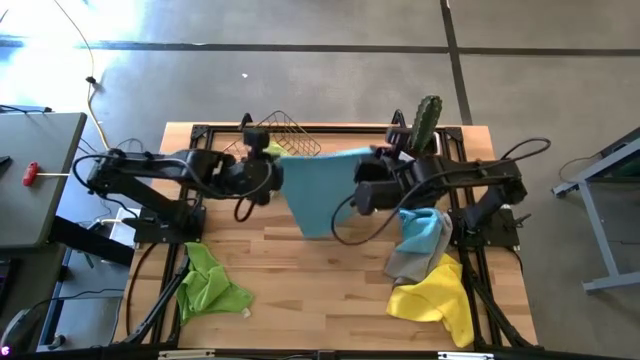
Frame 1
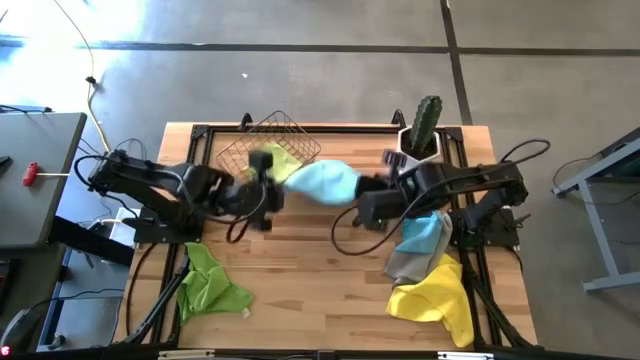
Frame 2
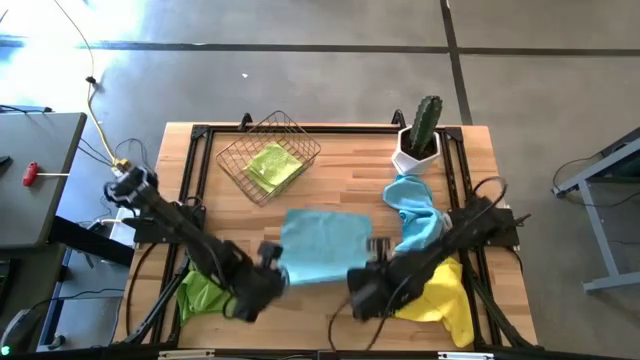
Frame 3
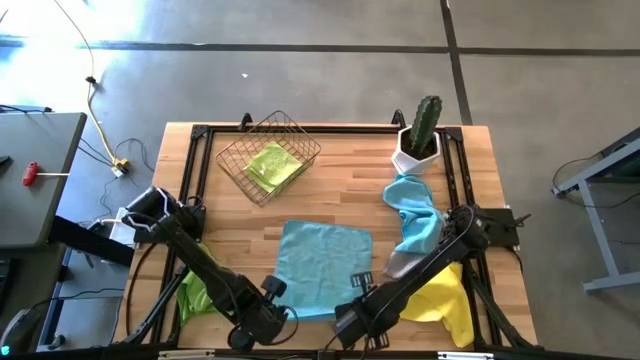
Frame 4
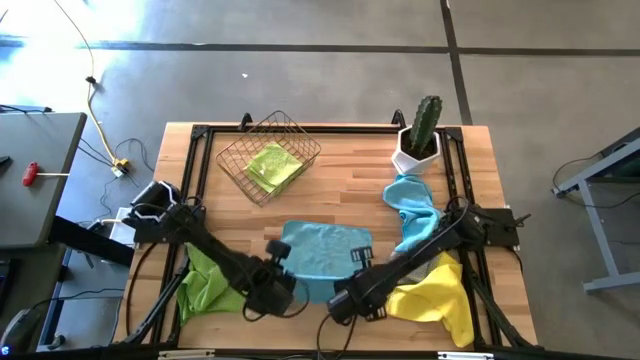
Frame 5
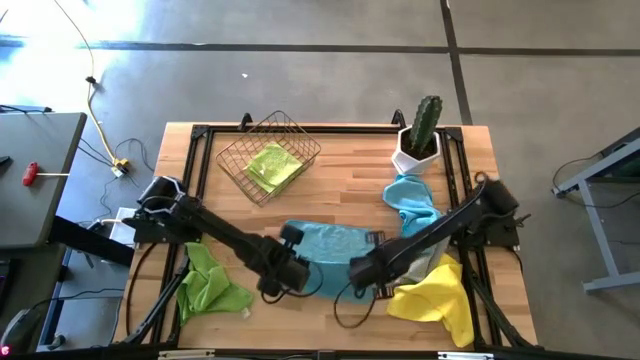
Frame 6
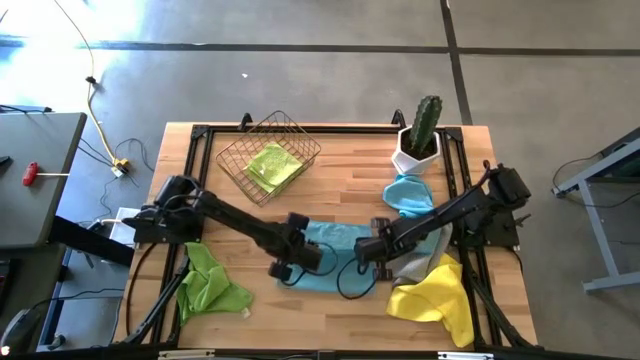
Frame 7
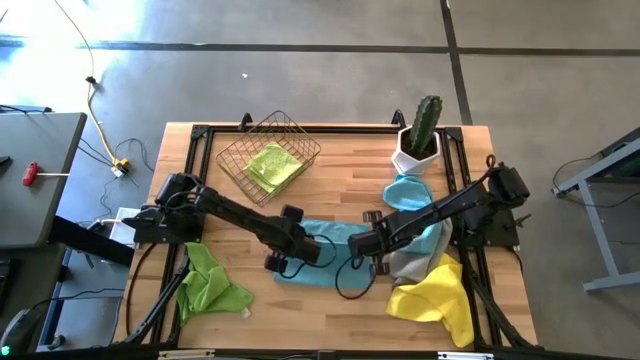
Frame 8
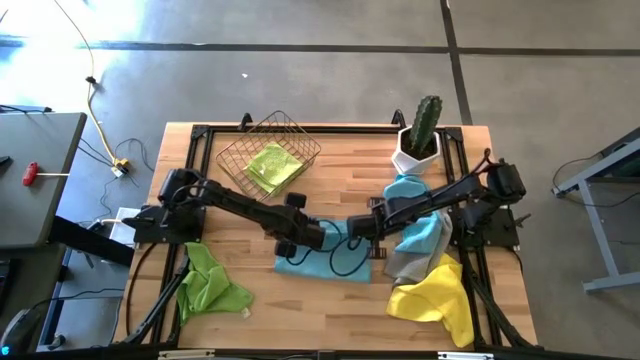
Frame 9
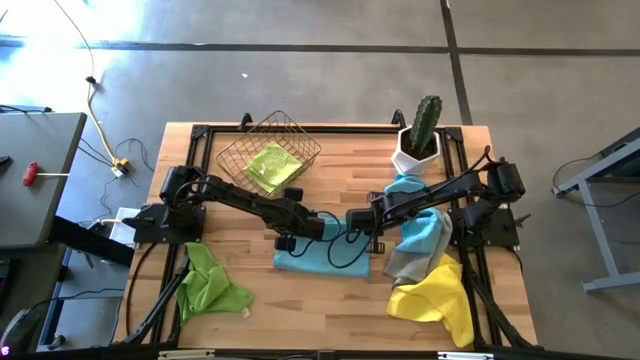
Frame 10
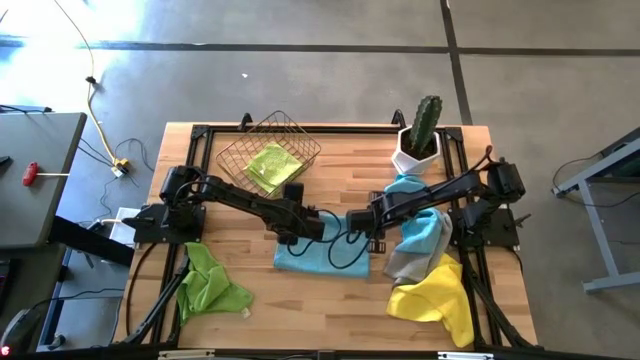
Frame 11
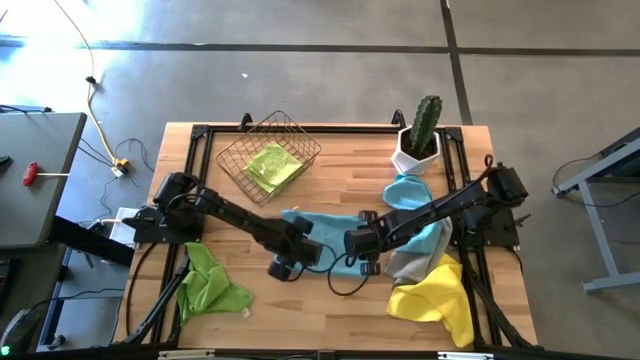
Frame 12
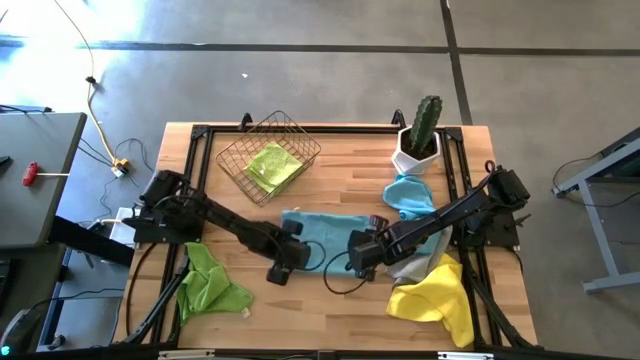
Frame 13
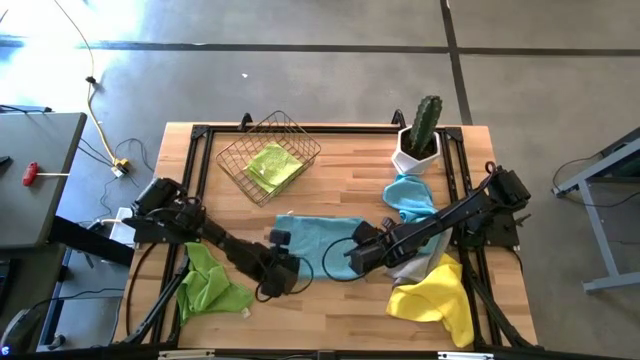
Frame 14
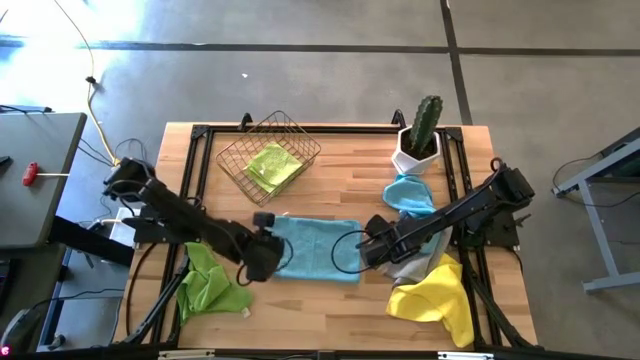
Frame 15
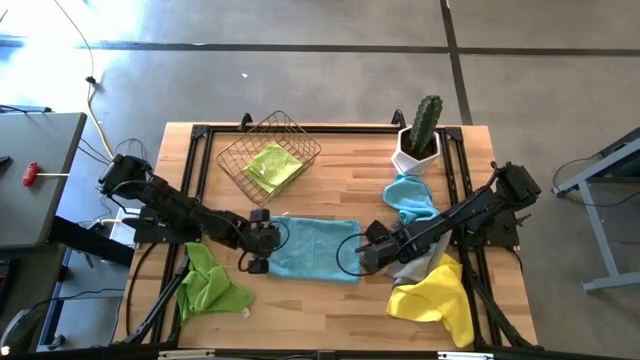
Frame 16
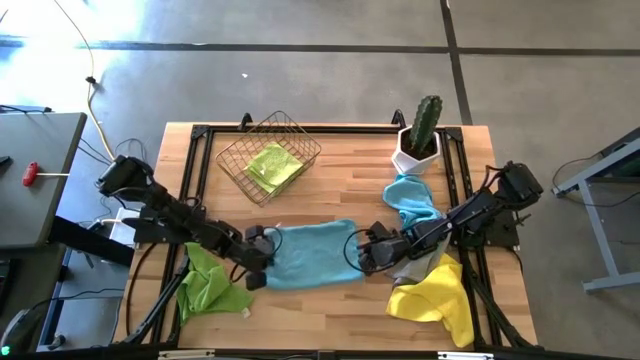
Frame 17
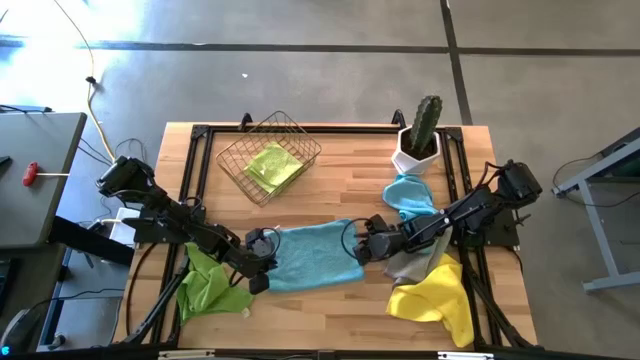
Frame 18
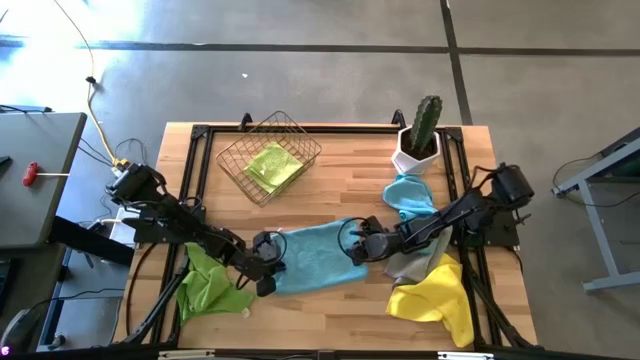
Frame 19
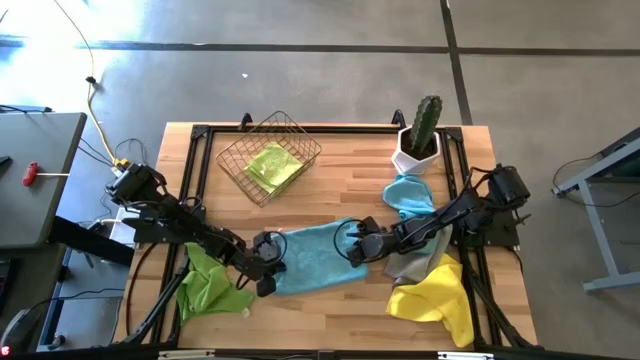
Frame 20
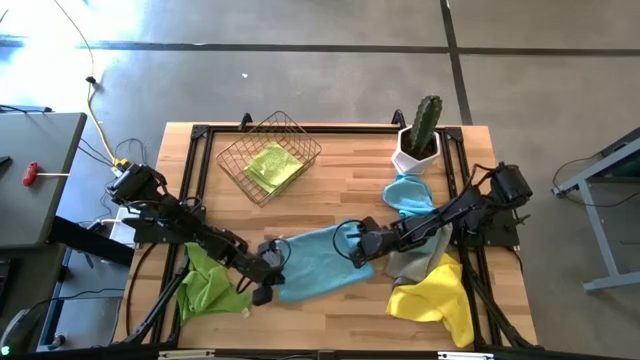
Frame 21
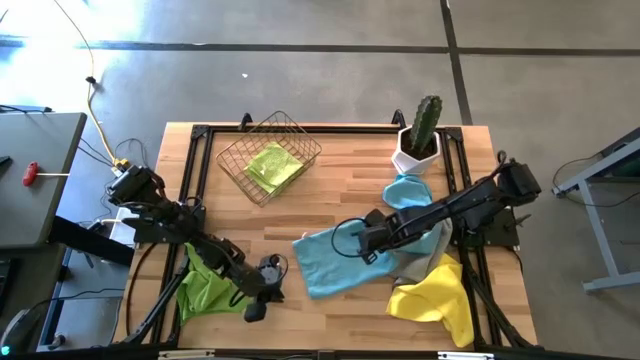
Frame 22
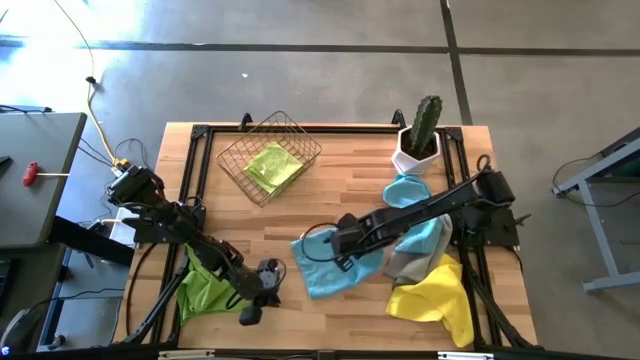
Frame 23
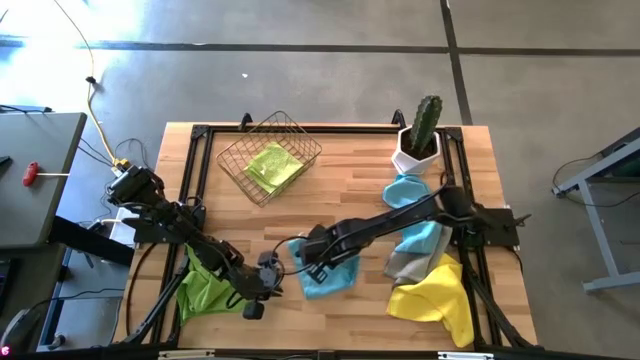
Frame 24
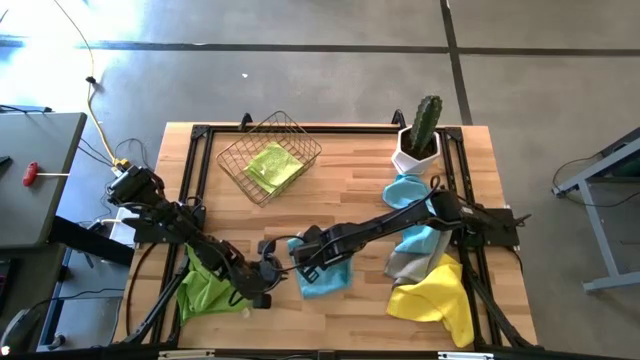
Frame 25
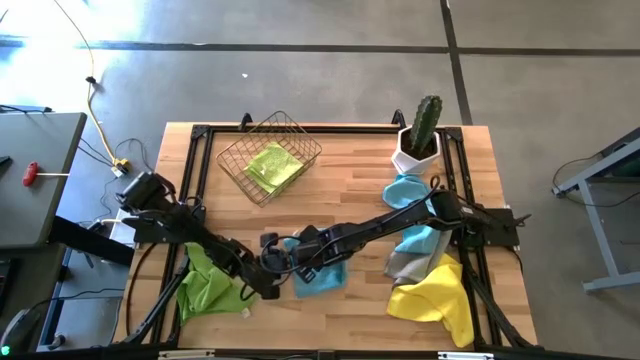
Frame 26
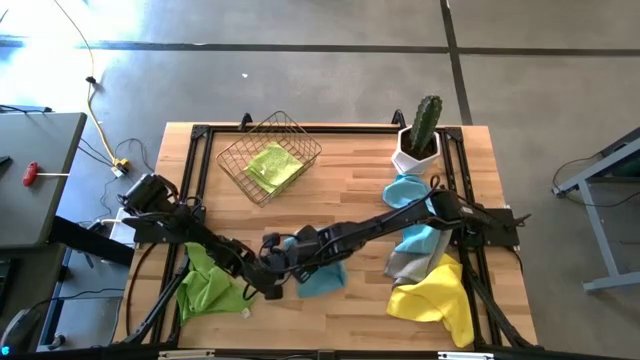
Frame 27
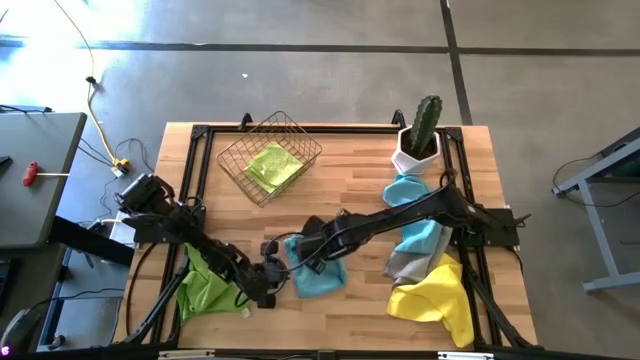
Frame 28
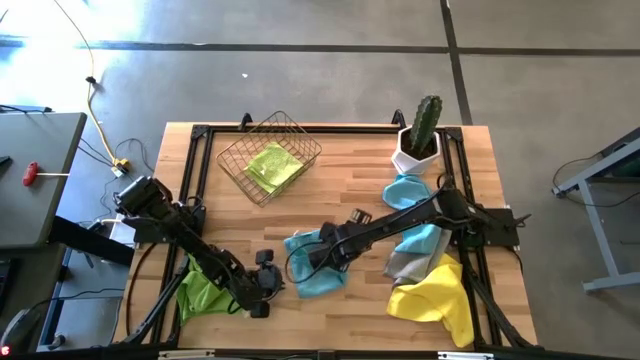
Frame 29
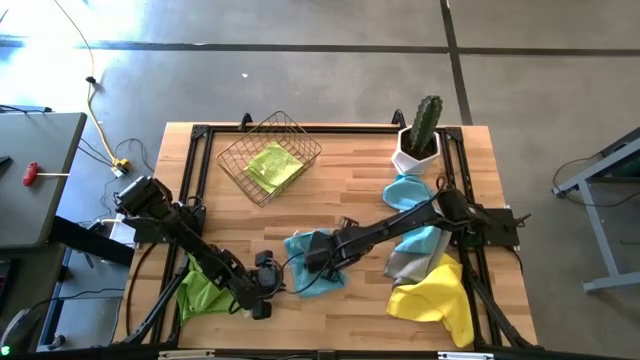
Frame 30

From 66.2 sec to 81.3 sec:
Task: Fold microfiber towels
Fold the bottom light blue microfiber towel

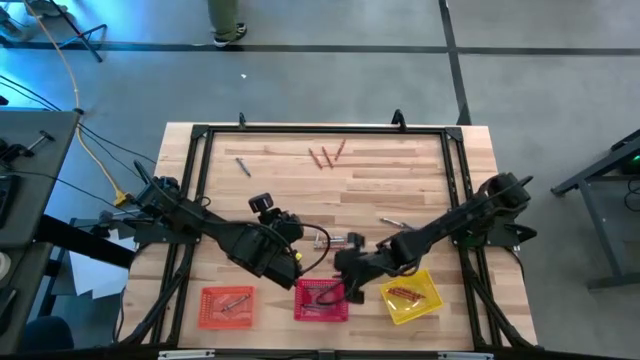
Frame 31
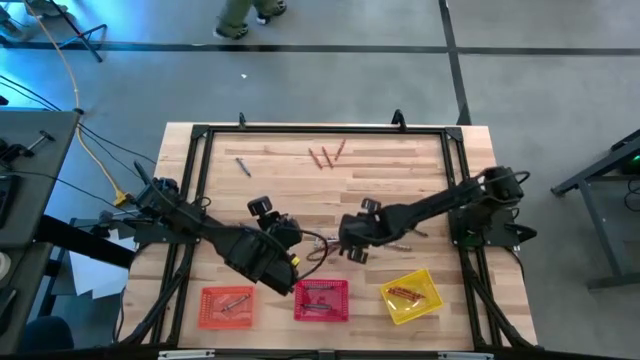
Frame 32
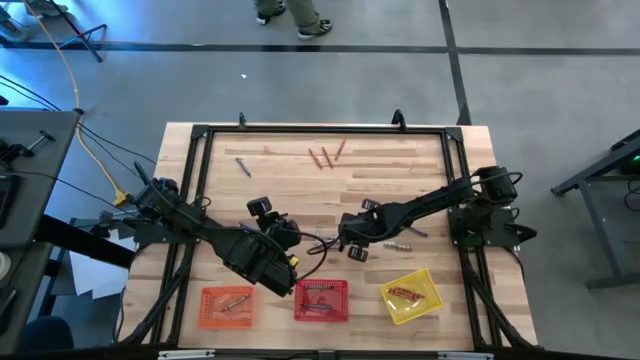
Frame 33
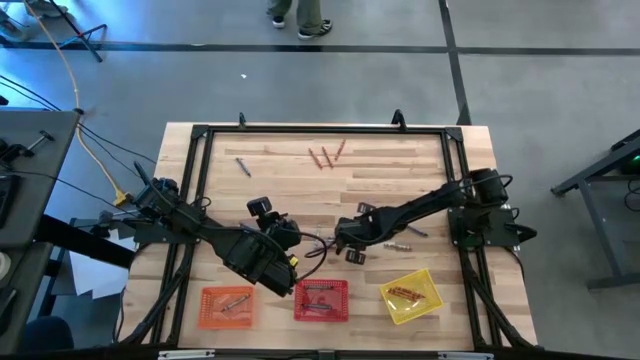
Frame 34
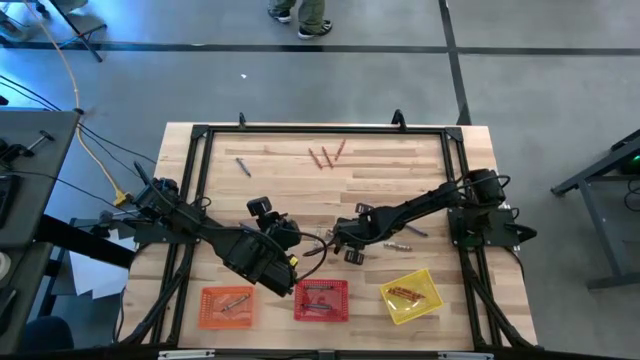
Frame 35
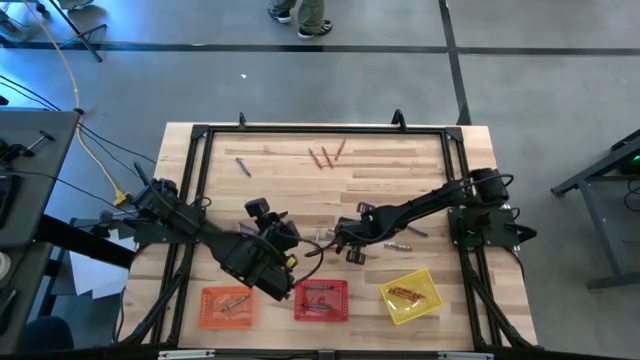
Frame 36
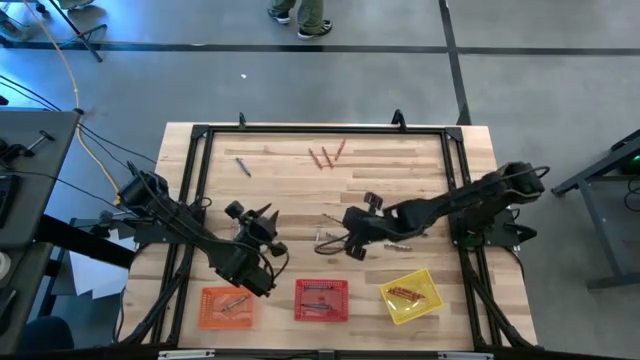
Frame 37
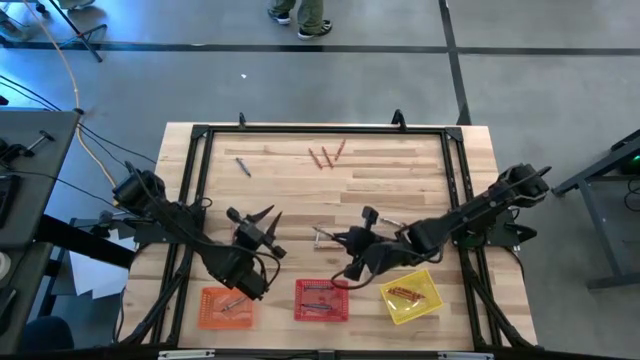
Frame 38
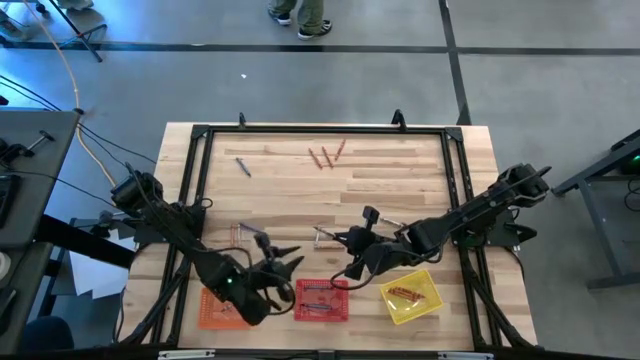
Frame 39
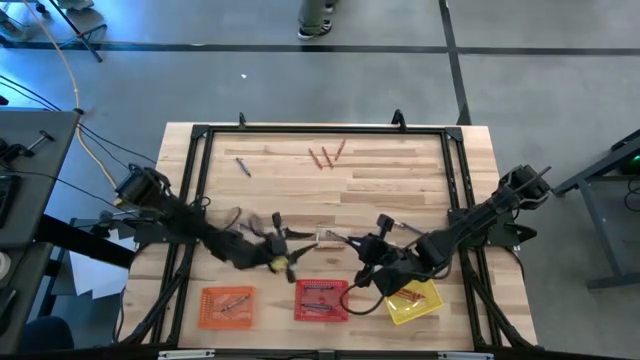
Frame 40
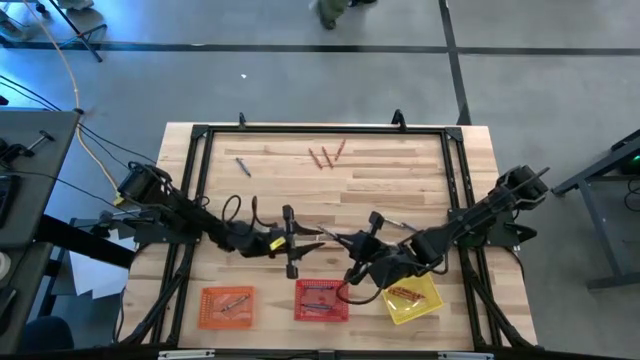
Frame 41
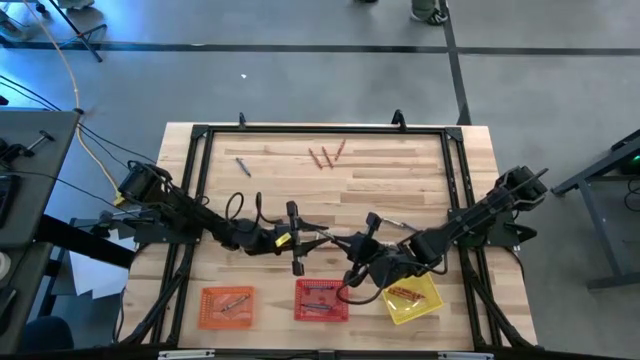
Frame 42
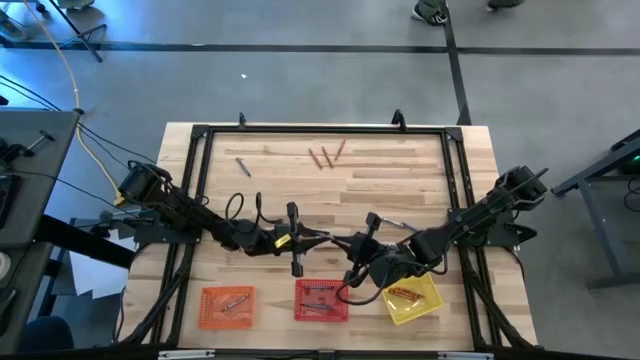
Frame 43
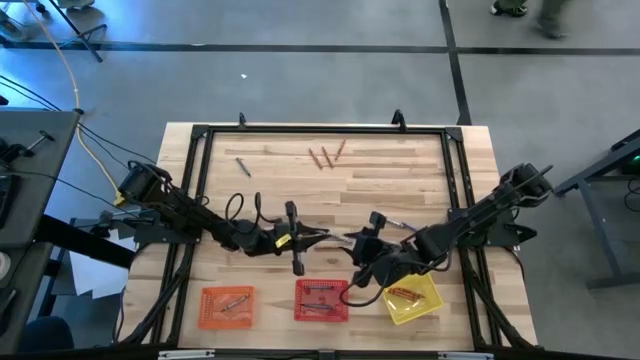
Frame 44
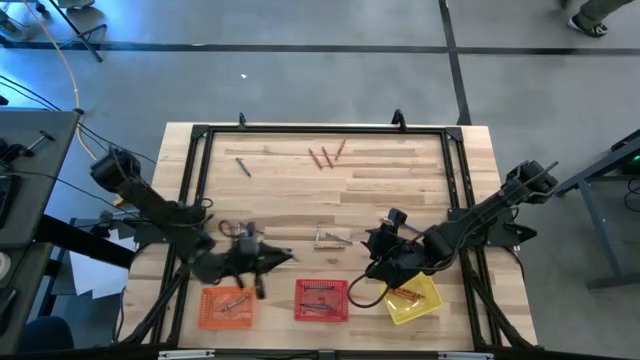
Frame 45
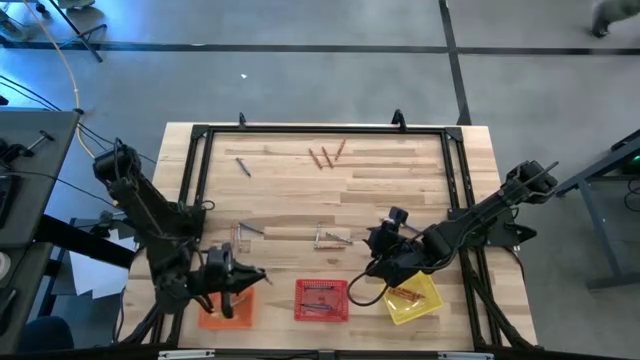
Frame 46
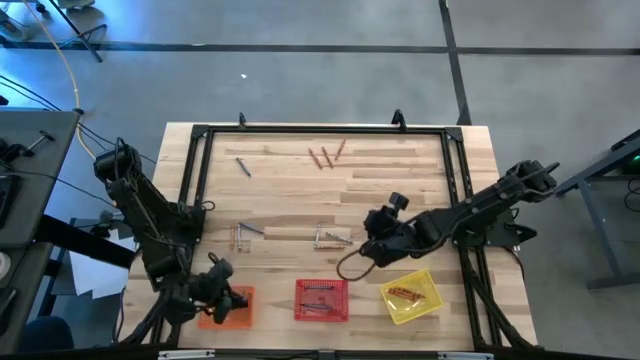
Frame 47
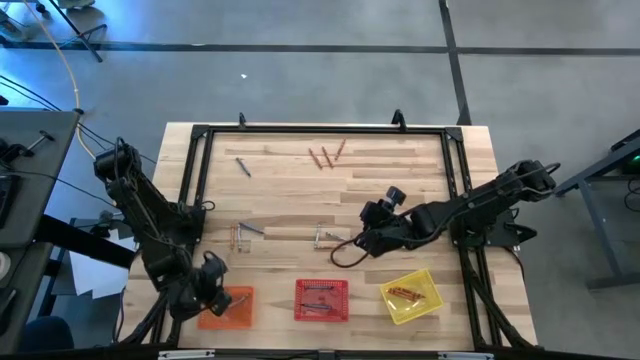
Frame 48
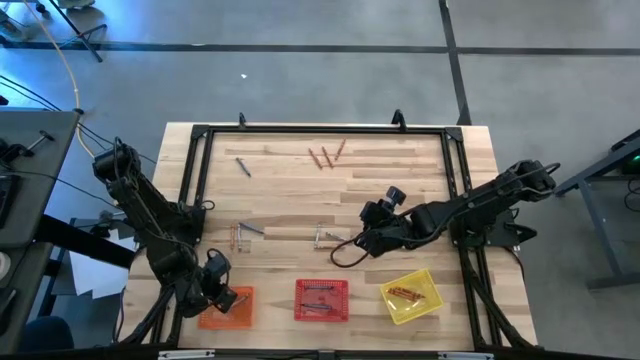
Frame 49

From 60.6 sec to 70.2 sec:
Task: Sort crayons
Put the gray crayon into the orange bin
